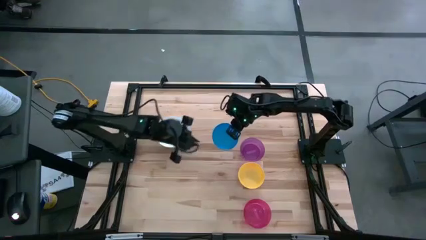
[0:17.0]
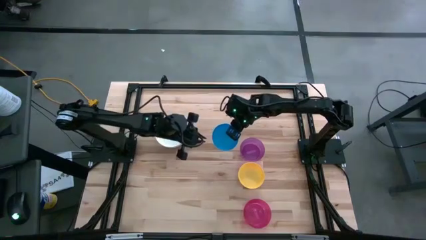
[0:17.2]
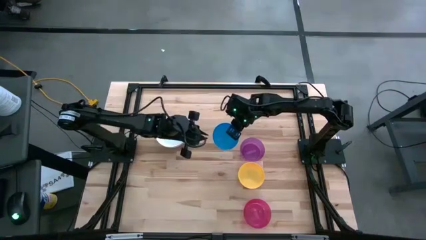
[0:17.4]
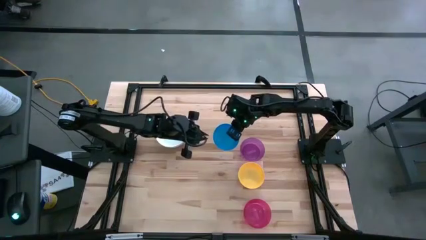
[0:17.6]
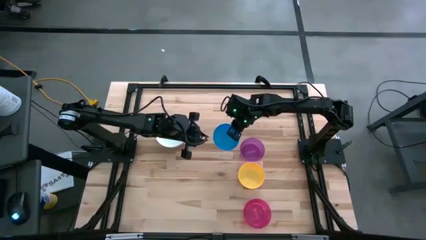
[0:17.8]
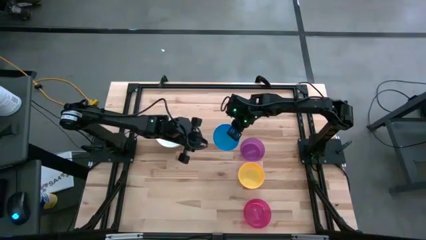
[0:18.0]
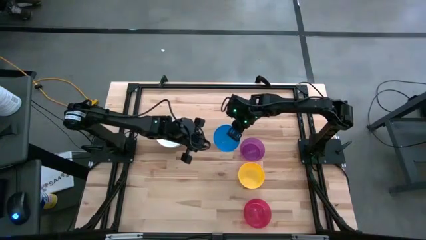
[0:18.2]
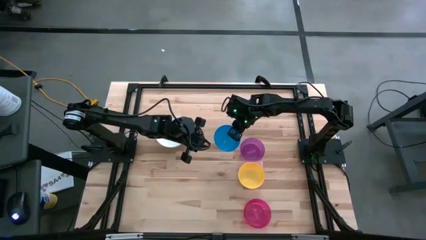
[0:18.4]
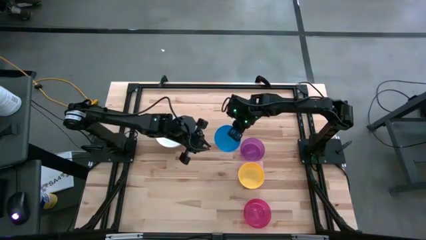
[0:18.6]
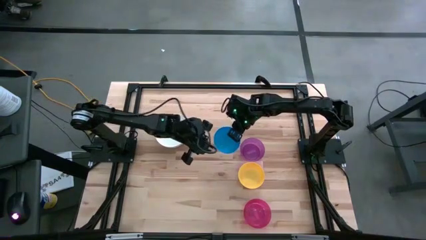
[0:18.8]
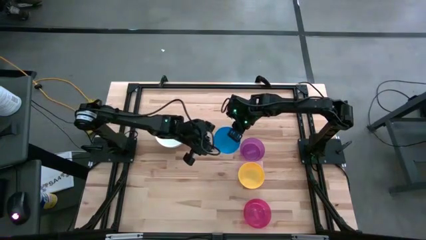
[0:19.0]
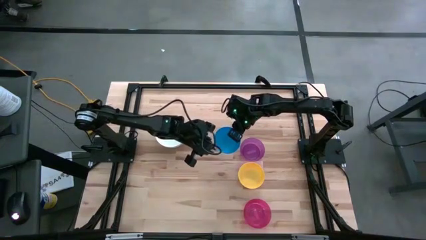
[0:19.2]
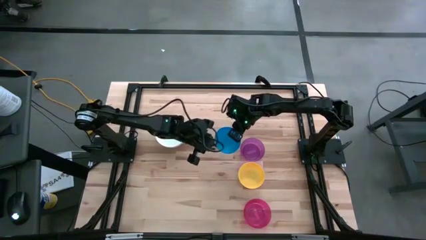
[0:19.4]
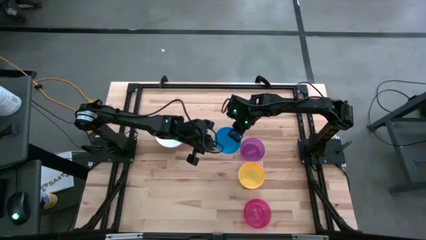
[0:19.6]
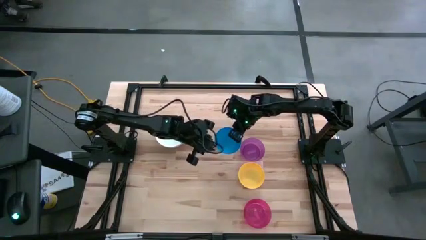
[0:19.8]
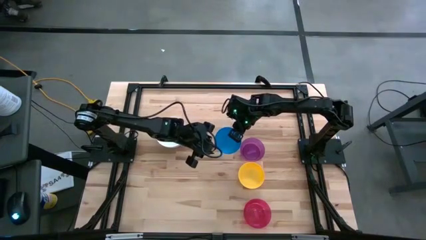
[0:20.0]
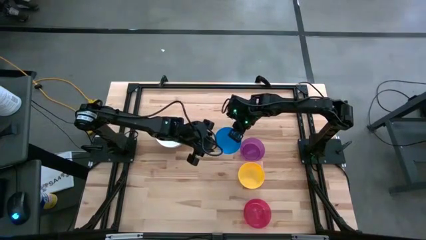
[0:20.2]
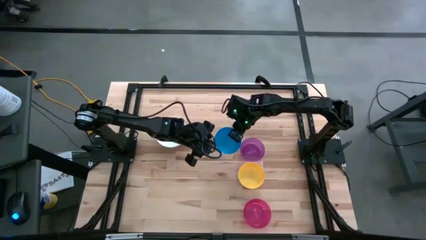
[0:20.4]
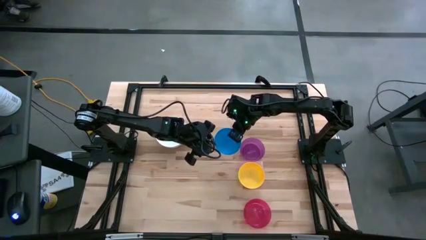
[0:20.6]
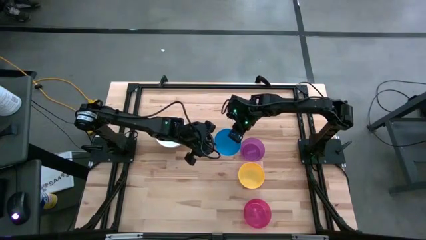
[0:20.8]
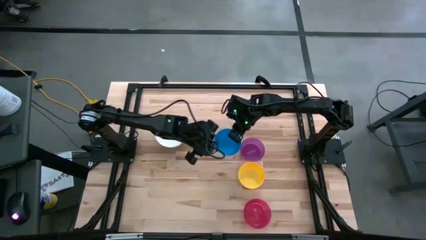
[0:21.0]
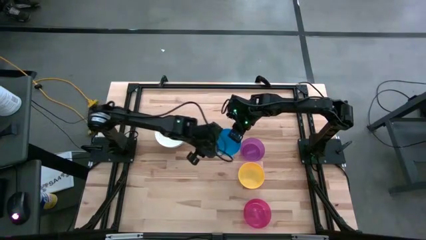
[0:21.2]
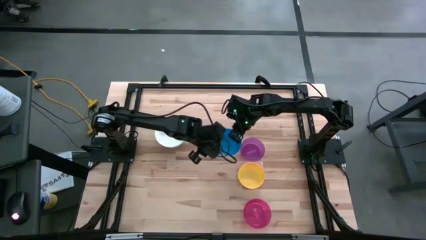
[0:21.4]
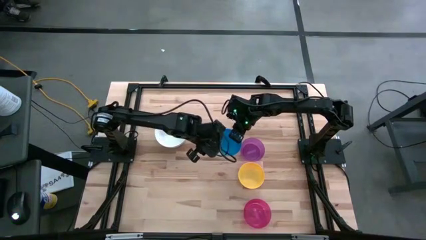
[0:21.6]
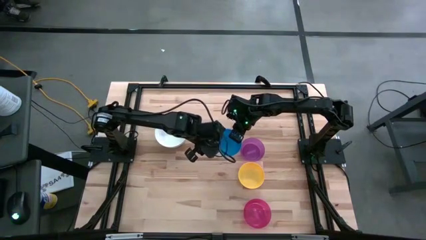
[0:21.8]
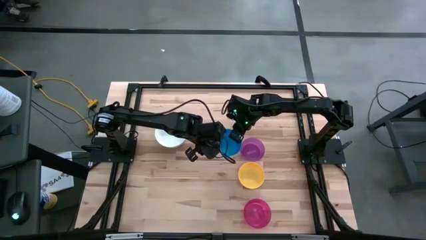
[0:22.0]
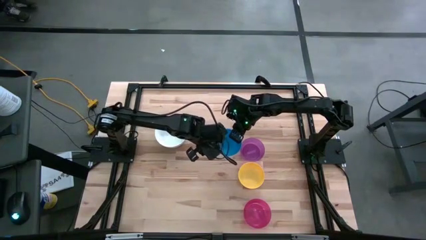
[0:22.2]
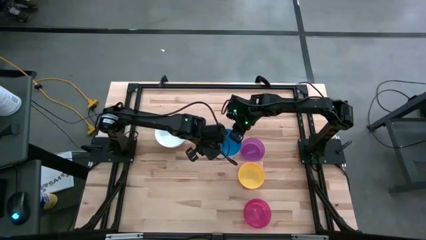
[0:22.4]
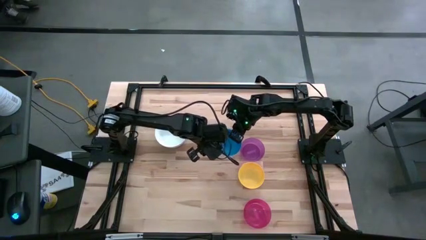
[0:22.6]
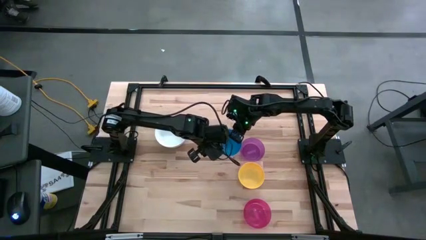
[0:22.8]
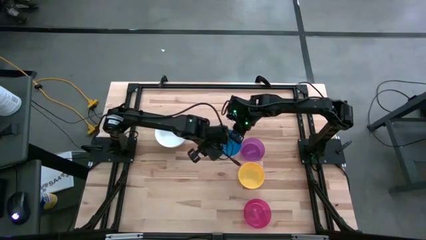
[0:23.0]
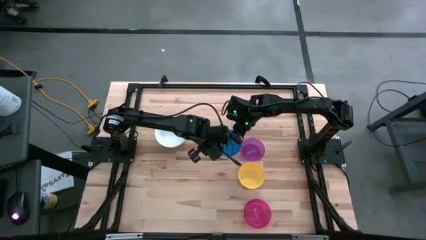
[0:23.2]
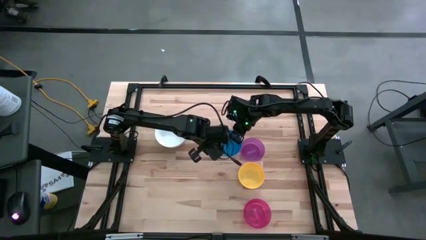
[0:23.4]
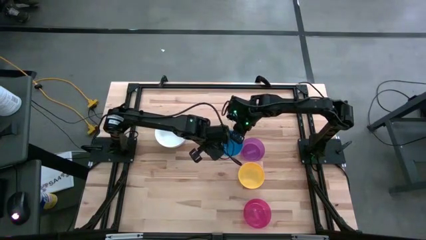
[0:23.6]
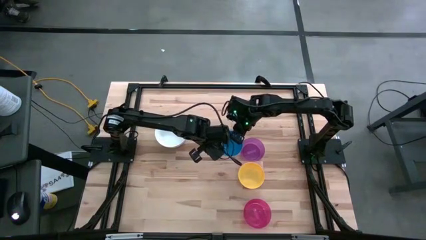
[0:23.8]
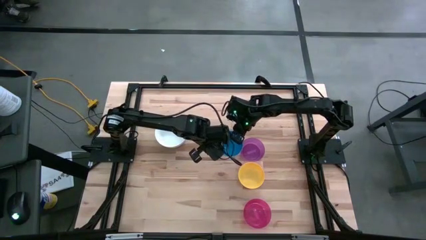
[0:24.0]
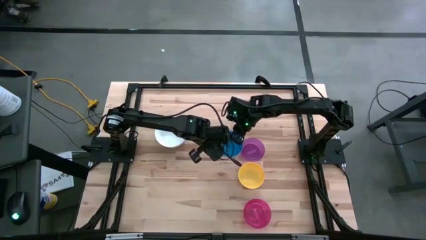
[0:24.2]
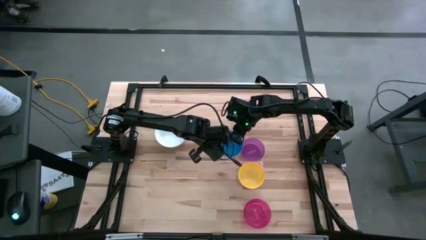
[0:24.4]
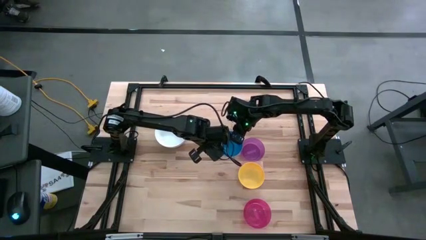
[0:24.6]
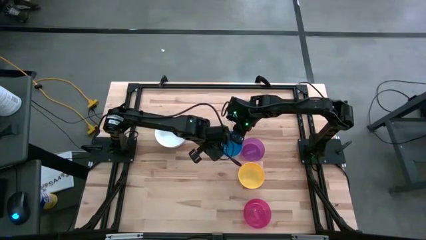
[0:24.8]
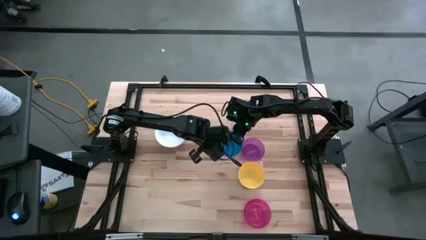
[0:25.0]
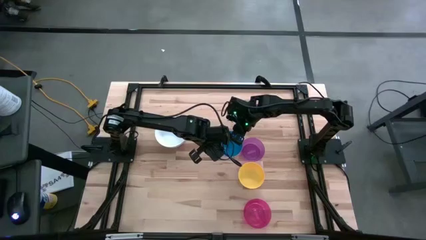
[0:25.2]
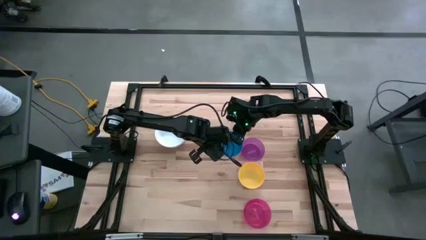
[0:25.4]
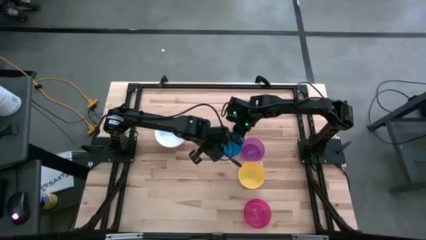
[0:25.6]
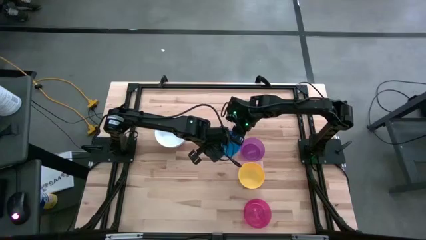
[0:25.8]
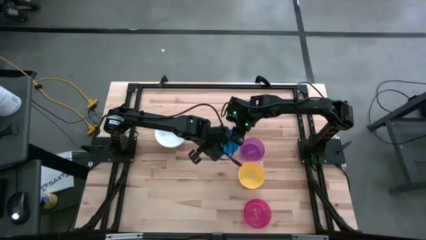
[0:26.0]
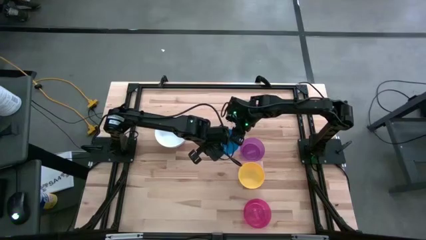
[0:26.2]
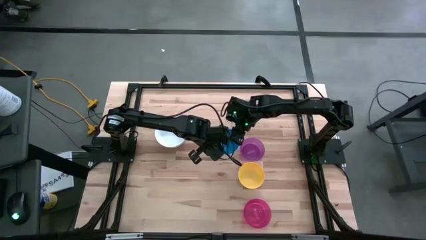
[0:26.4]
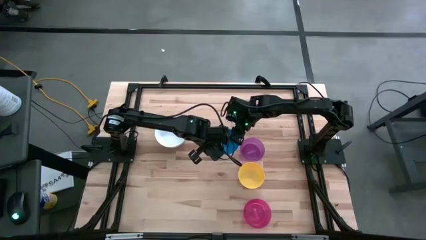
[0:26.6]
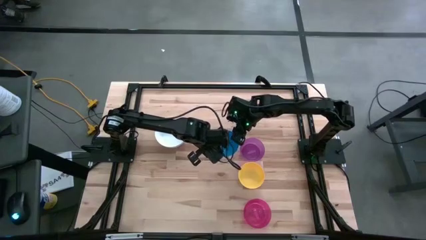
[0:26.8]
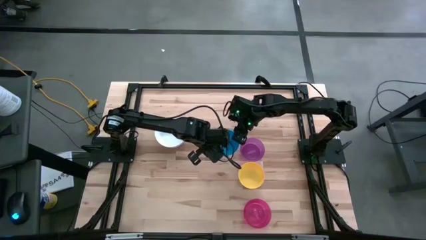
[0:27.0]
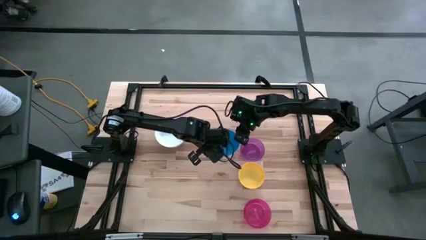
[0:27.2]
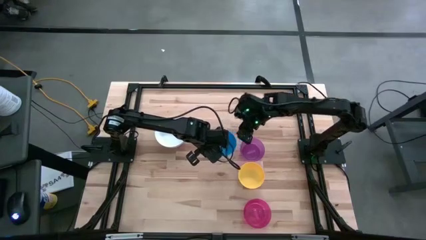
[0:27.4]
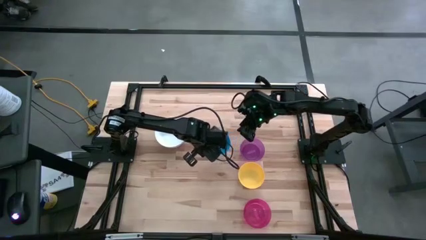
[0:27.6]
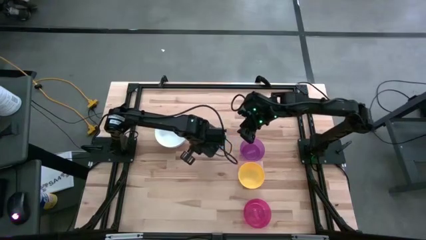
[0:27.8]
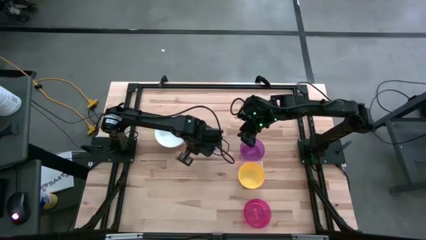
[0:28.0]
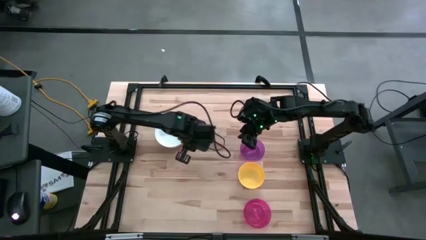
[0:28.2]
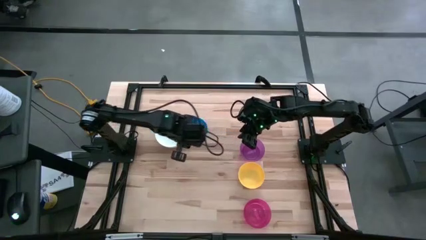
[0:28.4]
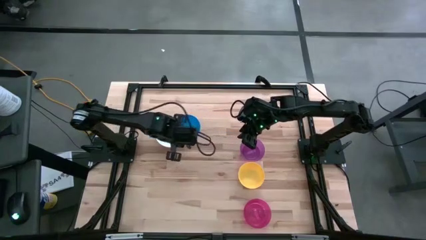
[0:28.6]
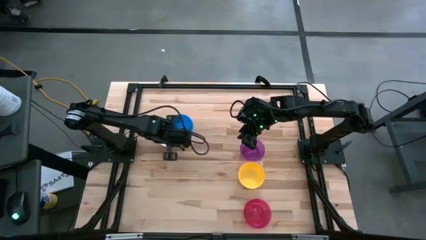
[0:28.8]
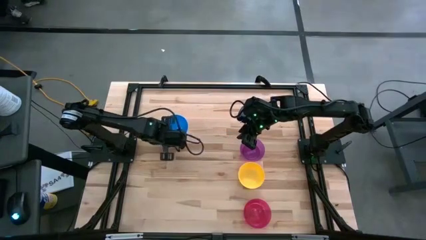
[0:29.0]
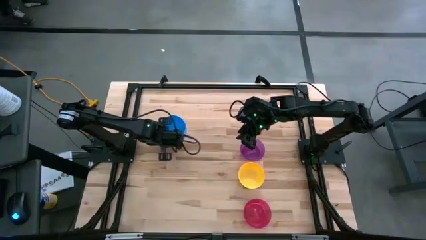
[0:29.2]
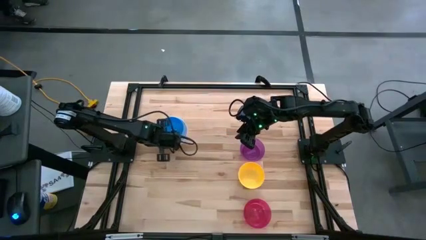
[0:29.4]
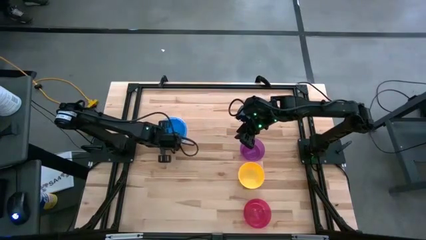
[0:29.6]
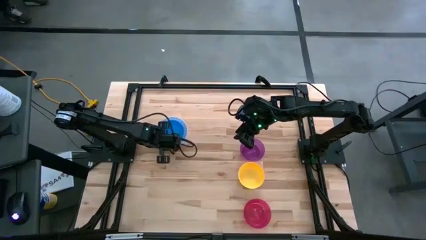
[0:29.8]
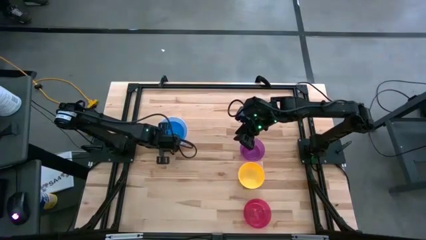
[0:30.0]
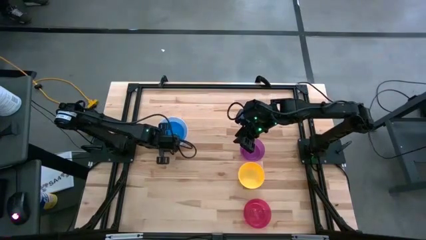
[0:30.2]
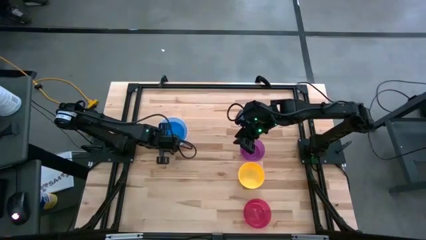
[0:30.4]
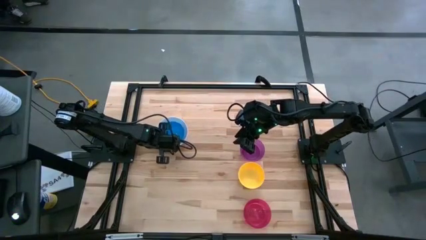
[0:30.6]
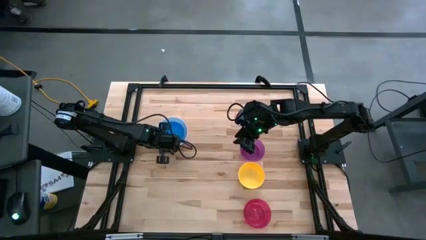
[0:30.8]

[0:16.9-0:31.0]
Stack the blue bowl on the white bowl
